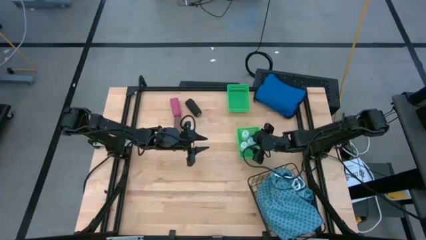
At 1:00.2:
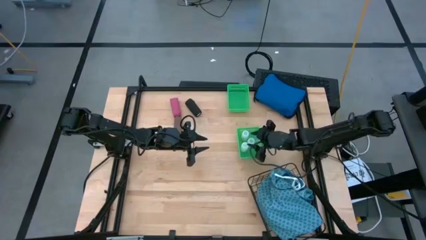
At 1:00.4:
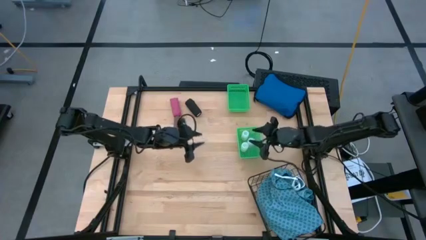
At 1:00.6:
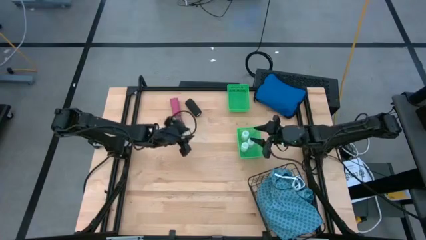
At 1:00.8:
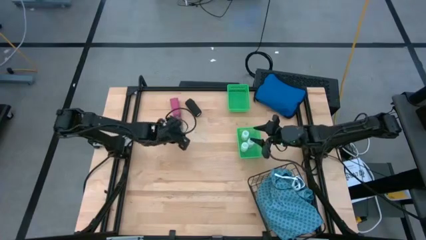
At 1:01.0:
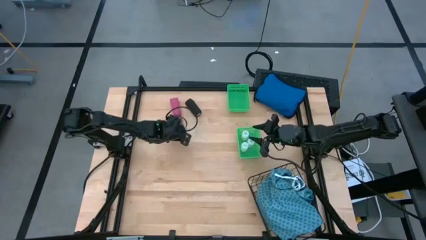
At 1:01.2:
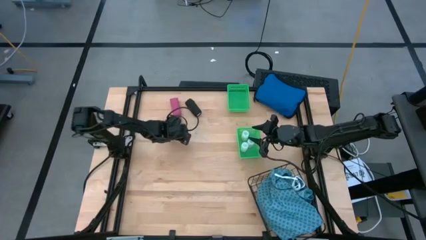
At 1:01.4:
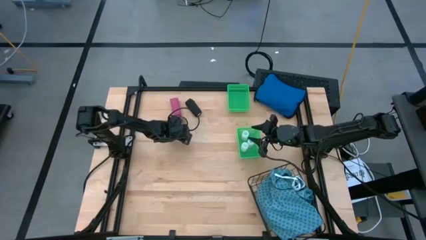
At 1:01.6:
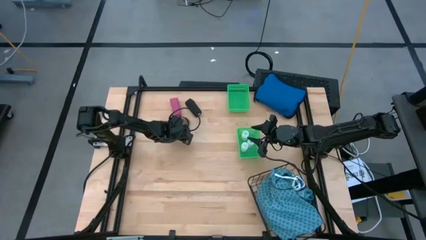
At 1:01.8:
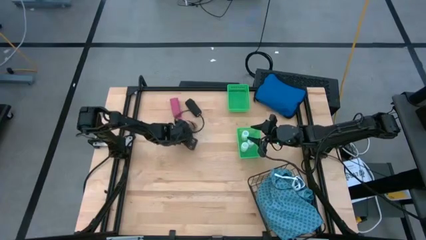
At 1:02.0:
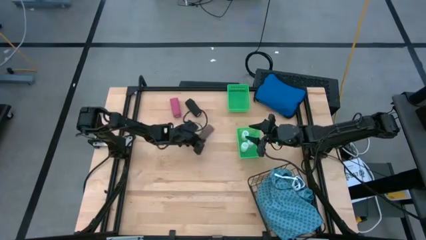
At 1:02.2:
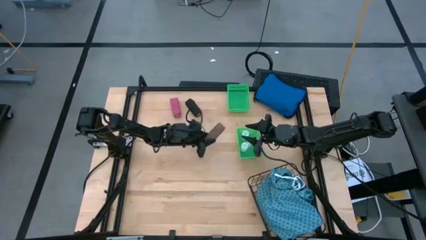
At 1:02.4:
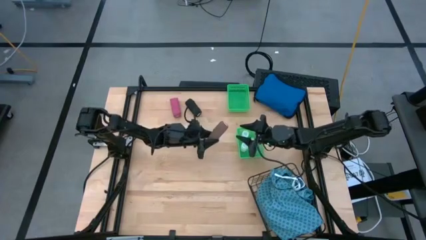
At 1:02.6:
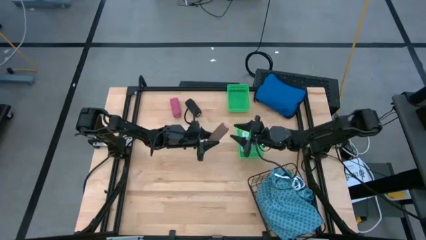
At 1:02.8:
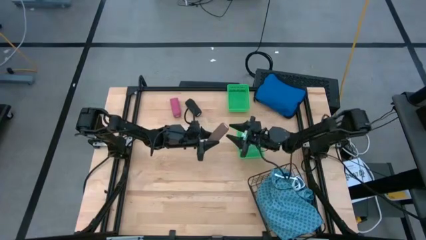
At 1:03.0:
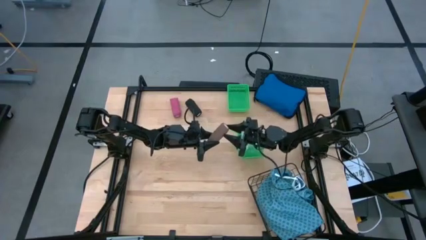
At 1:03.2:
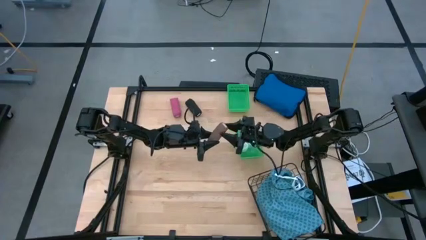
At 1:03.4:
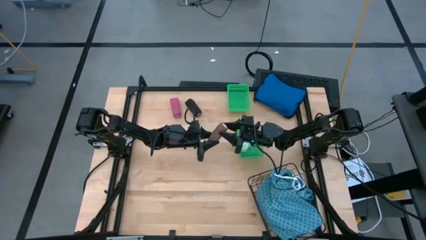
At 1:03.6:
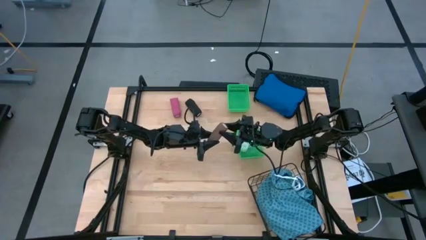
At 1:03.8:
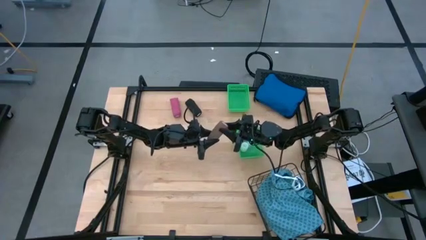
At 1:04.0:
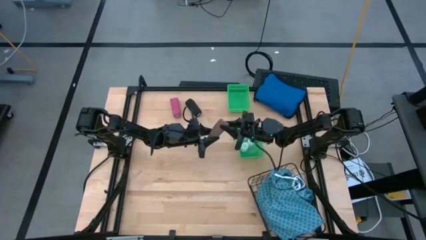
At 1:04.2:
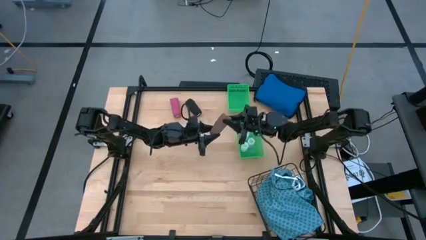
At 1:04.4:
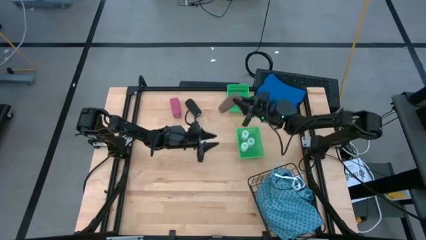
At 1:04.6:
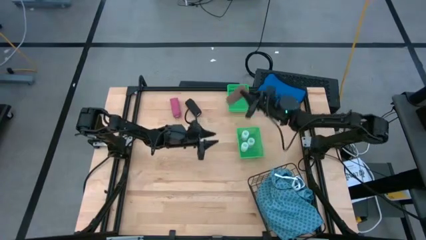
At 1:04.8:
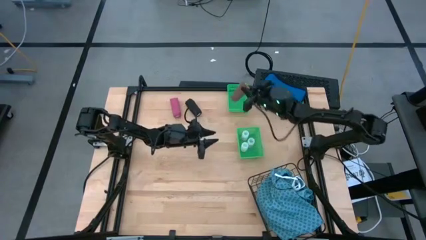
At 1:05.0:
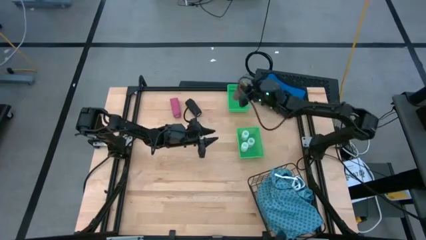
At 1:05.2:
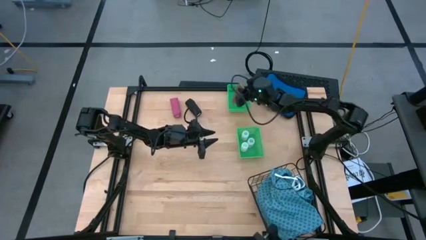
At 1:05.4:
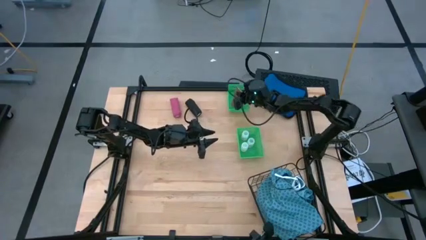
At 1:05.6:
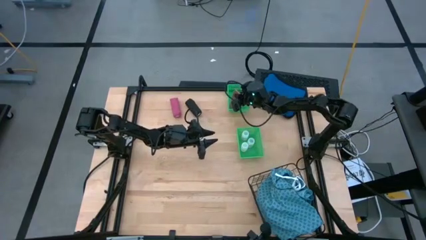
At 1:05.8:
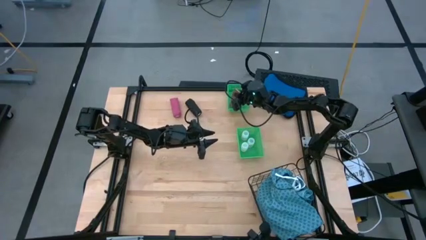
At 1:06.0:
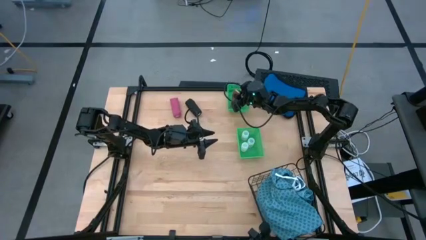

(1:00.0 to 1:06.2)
Task: Pick & Place Medicine items
Put the brown bandage into the top green bin

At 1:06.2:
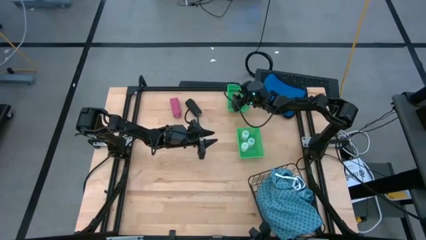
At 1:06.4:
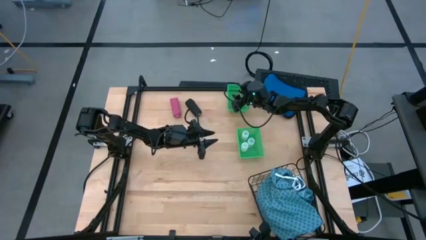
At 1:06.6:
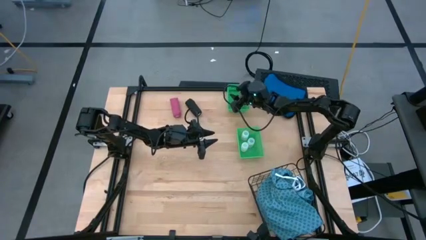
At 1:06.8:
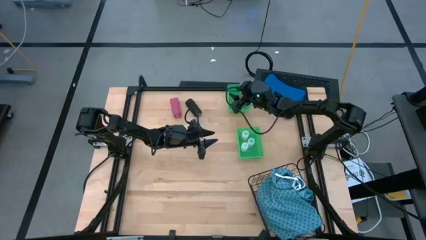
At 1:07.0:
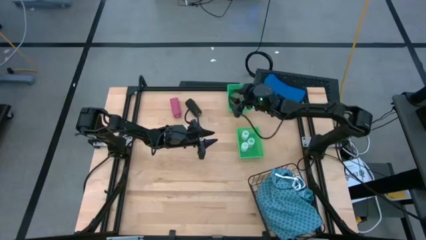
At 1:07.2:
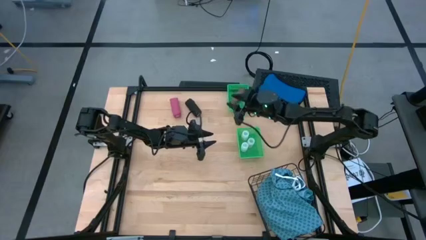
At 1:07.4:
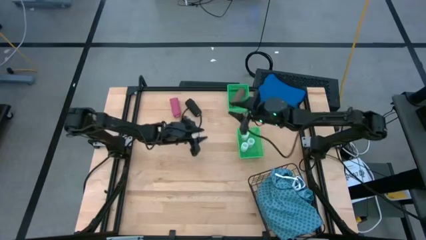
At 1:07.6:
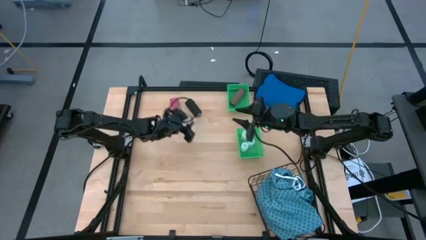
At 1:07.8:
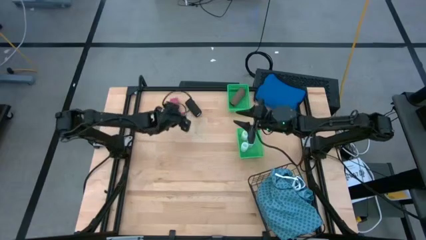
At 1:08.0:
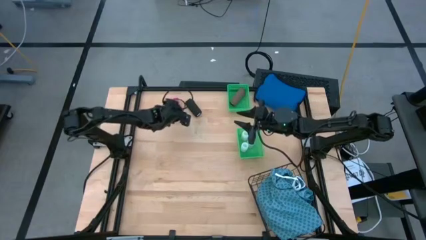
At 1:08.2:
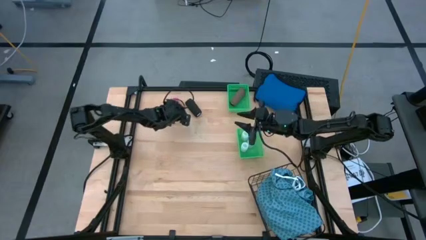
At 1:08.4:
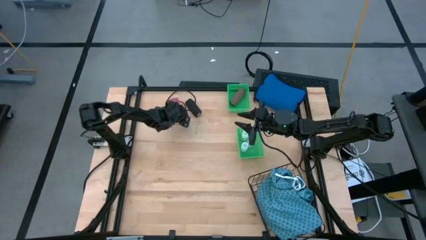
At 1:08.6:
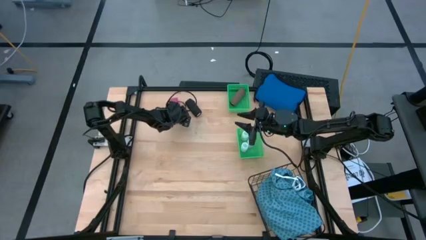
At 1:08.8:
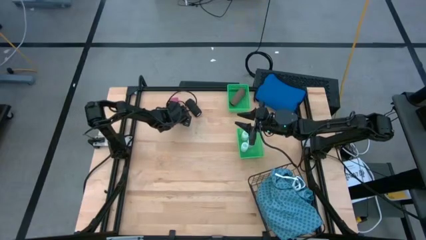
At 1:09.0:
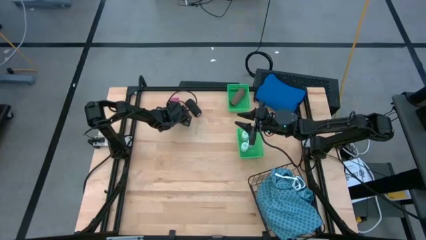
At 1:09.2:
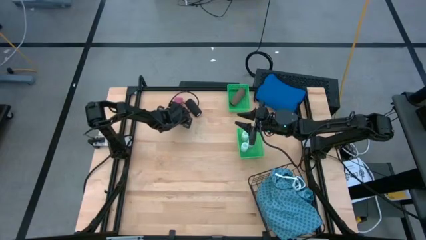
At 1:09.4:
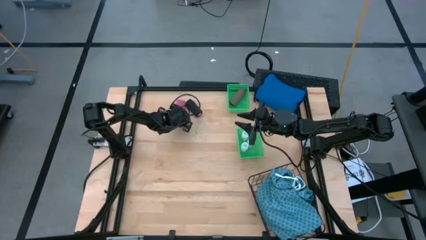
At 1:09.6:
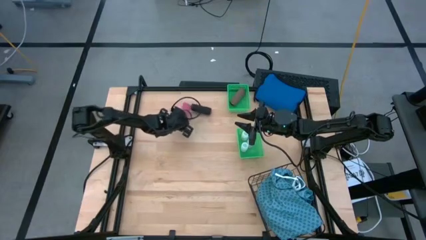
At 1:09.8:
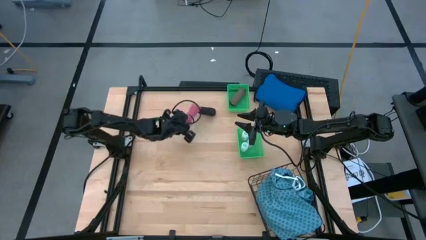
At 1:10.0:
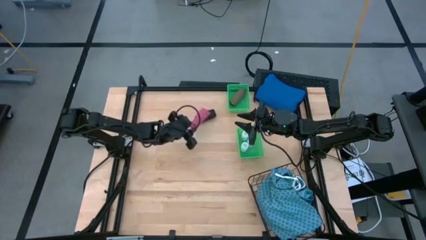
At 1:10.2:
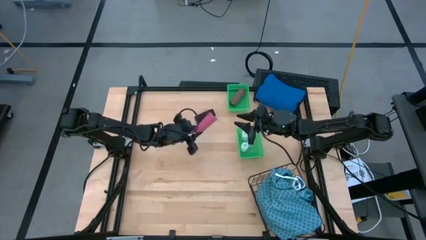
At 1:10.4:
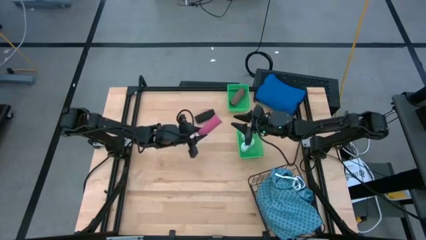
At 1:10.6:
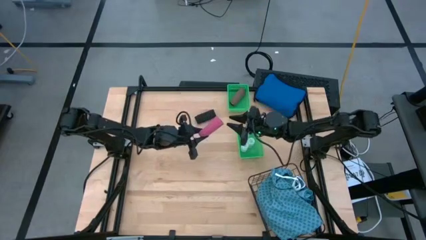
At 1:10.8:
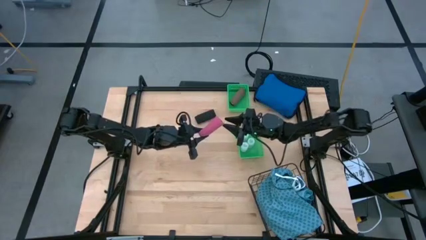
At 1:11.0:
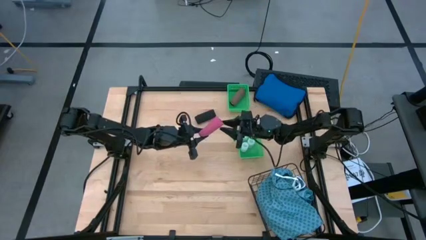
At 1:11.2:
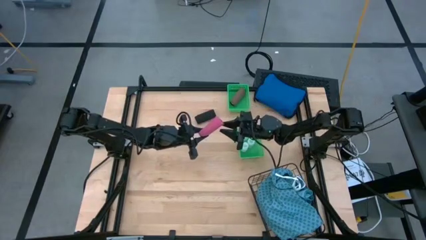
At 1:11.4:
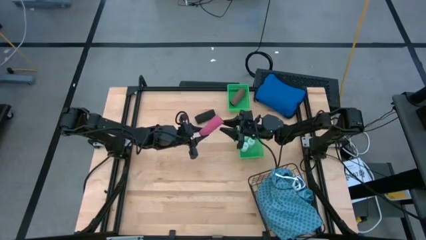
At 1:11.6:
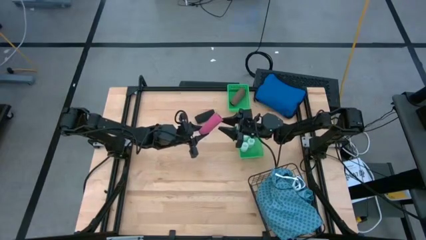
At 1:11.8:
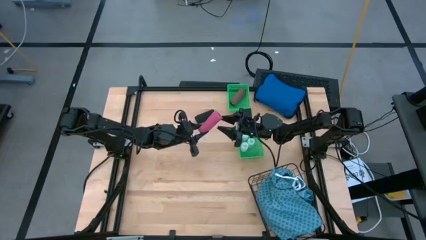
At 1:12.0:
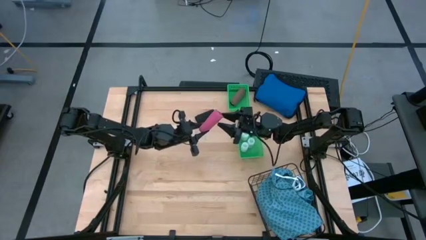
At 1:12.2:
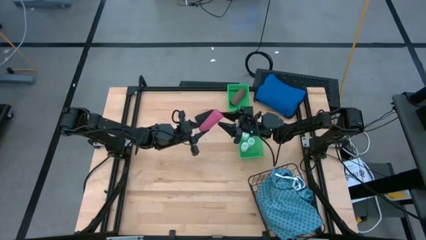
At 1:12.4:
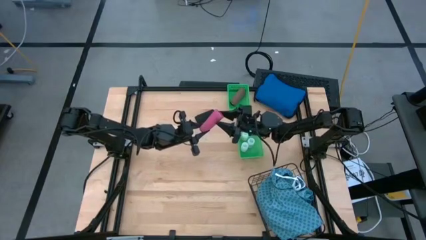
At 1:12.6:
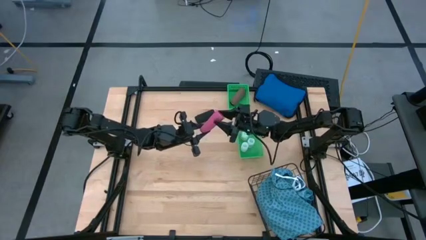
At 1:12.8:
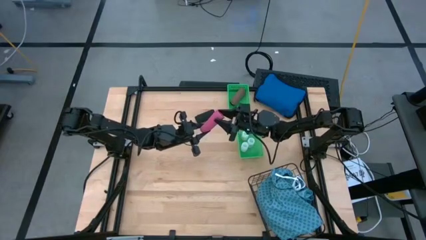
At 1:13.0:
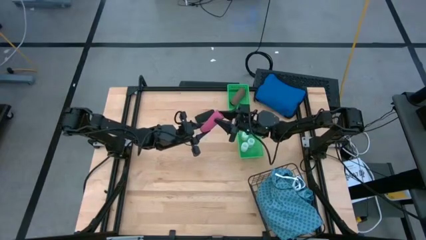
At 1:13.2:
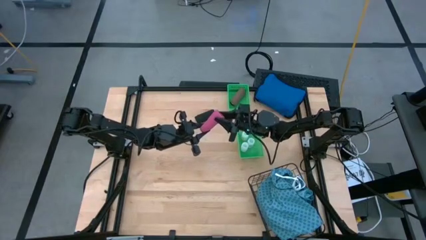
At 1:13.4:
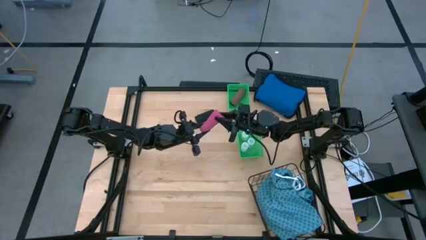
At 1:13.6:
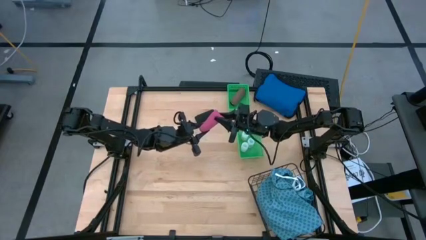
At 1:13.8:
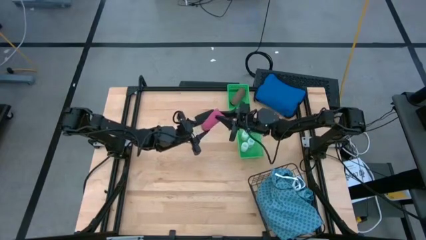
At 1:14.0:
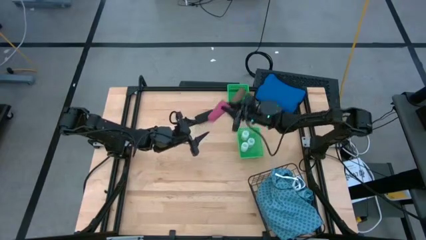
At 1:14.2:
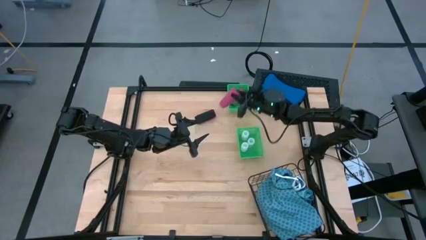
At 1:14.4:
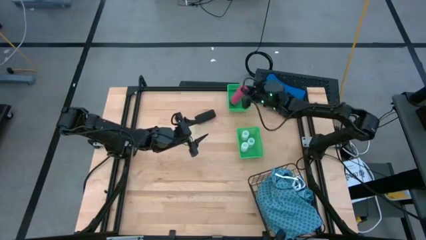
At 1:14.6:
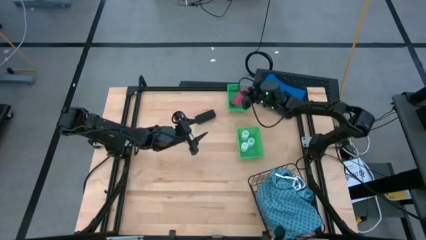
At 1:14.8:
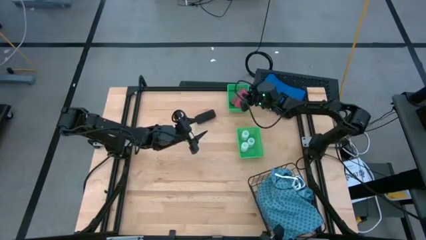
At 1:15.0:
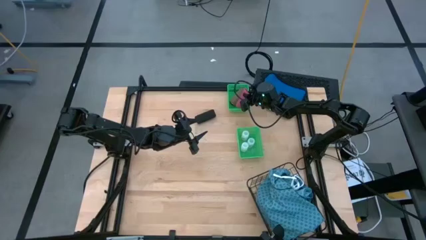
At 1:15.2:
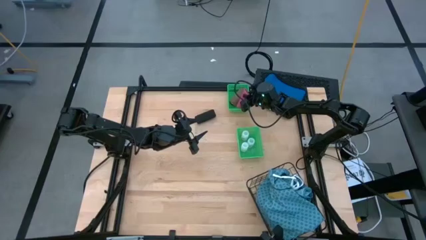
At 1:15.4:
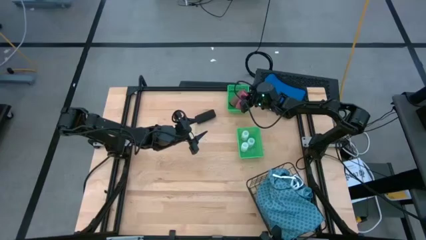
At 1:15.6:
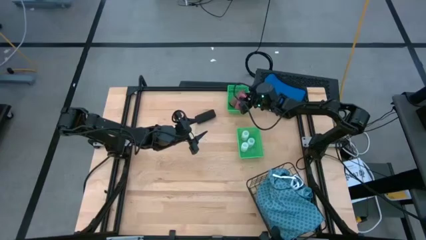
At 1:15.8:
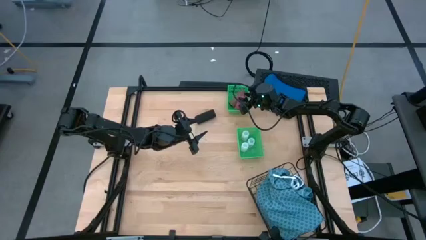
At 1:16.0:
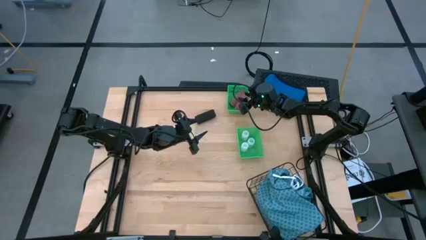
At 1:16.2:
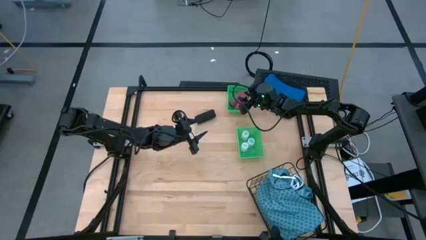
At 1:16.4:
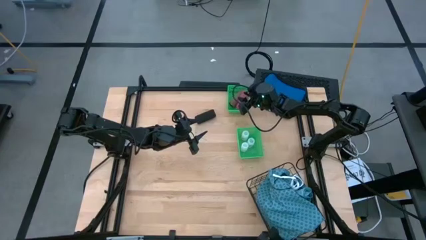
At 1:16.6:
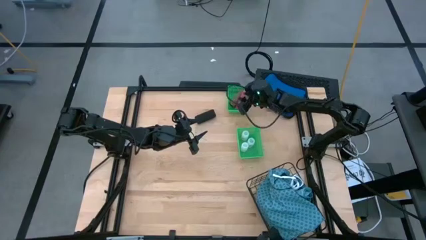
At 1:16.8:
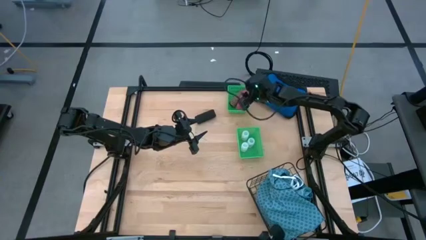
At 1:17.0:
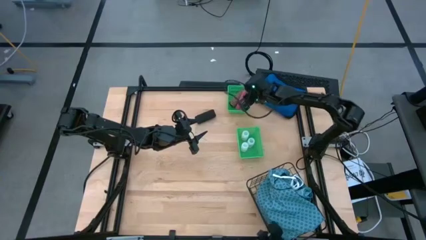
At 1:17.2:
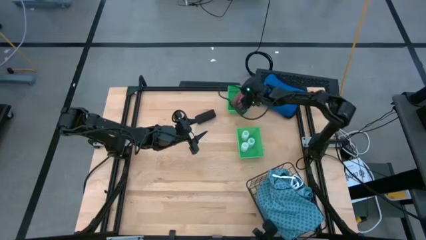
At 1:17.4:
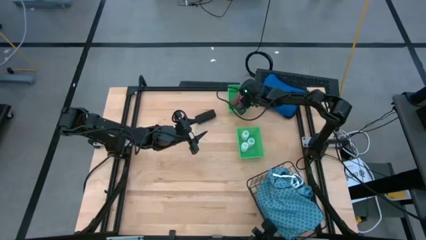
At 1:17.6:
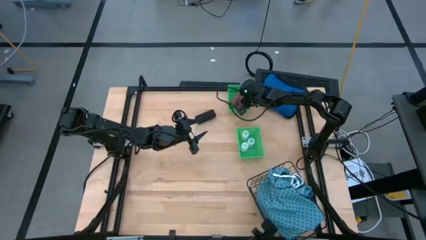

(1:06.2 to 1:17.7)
Put the pink bandage into the top green bin
